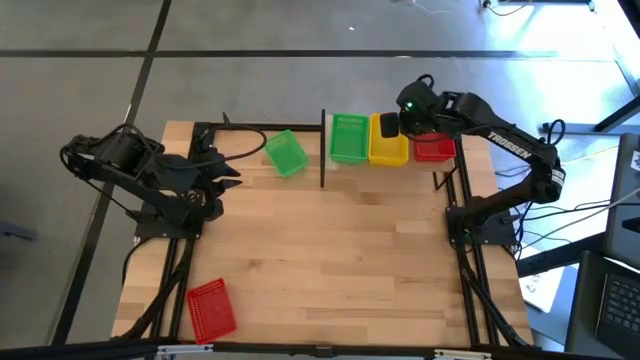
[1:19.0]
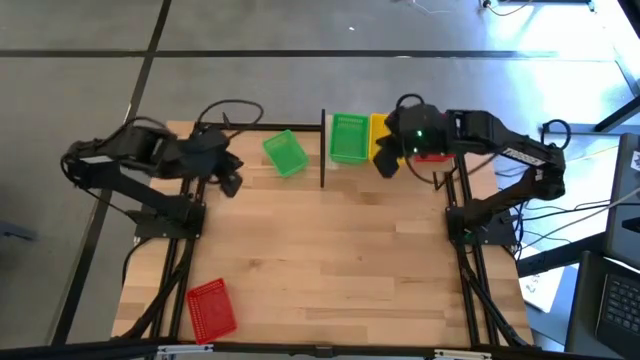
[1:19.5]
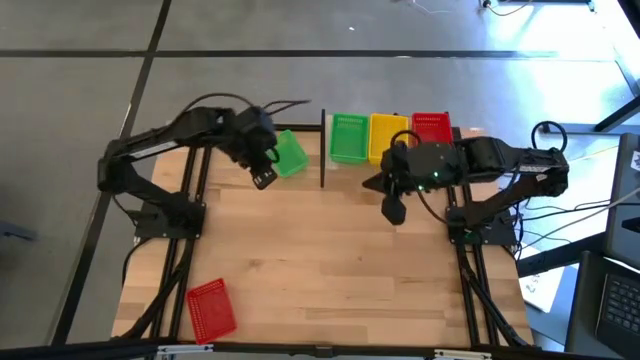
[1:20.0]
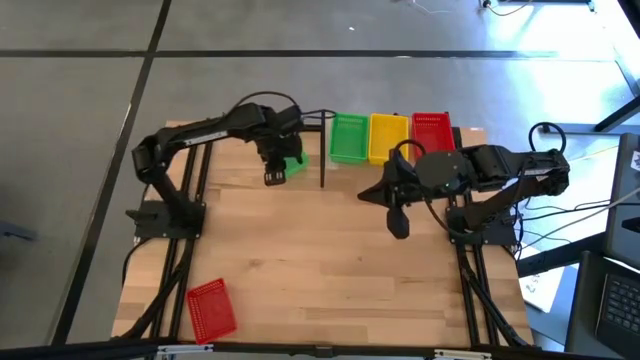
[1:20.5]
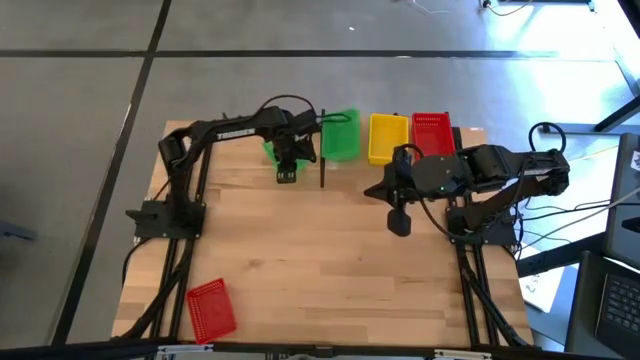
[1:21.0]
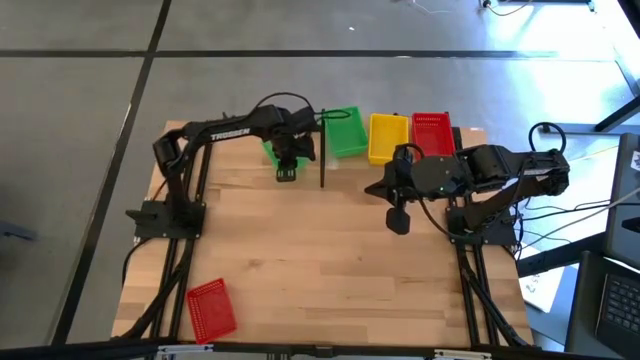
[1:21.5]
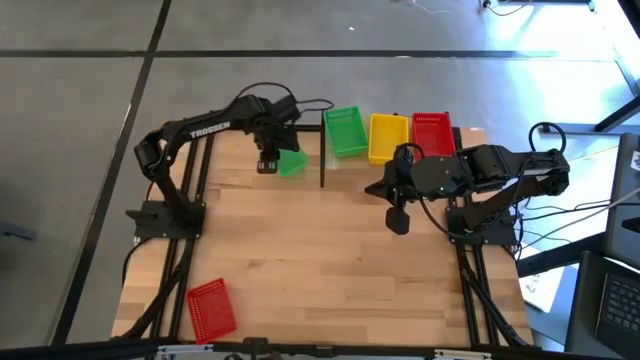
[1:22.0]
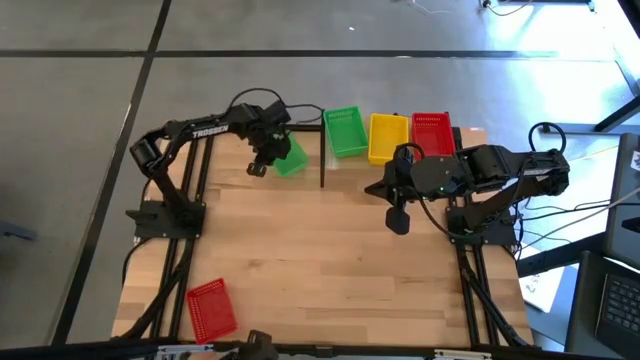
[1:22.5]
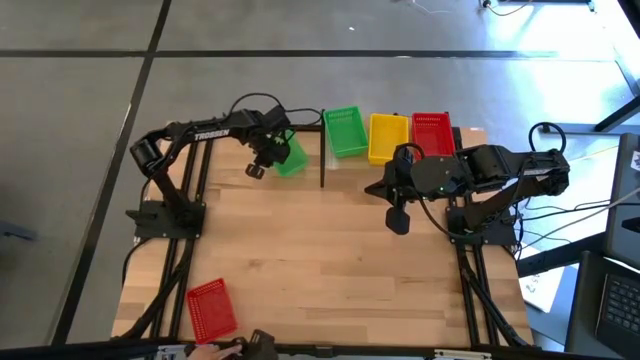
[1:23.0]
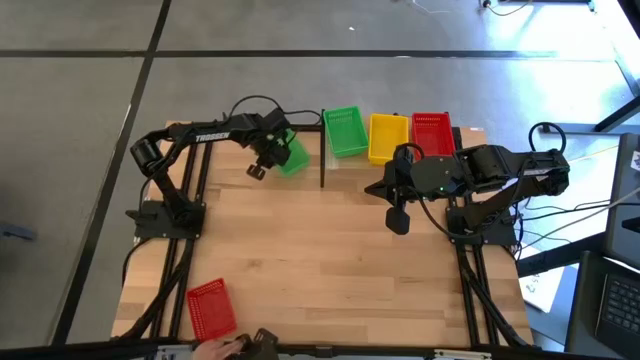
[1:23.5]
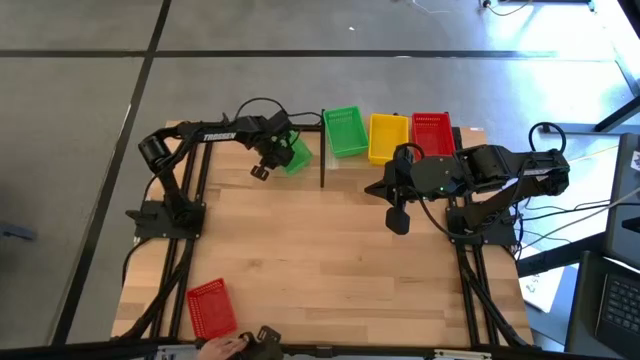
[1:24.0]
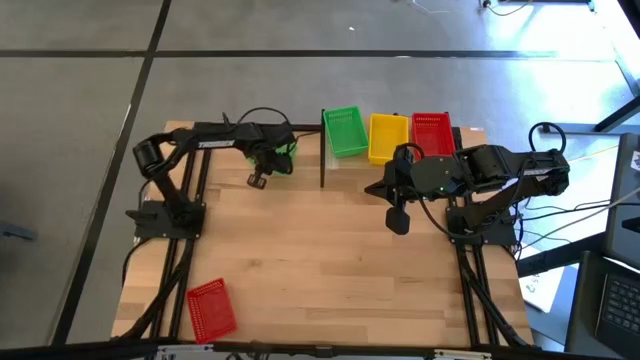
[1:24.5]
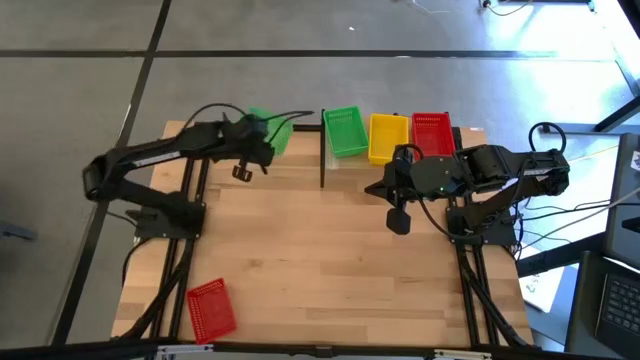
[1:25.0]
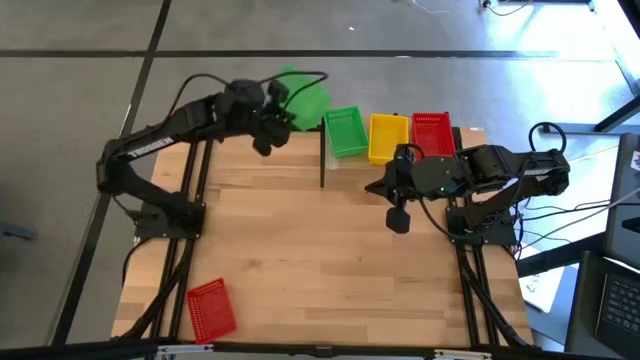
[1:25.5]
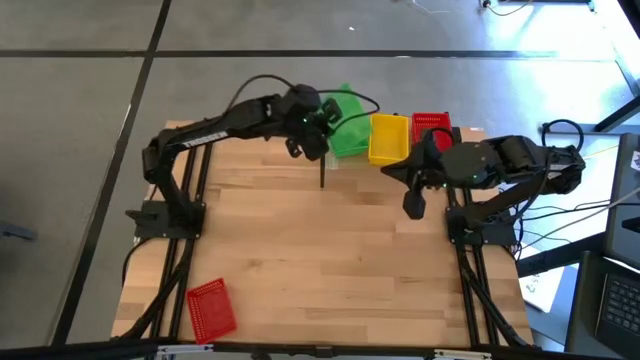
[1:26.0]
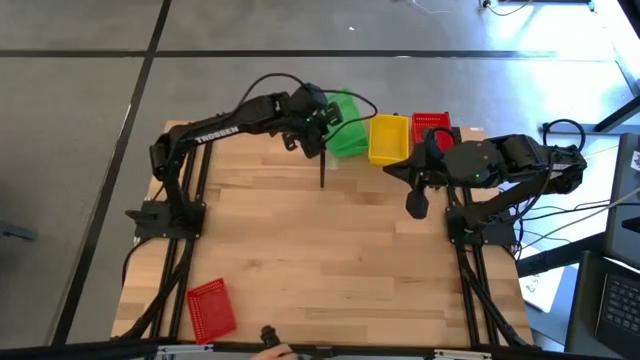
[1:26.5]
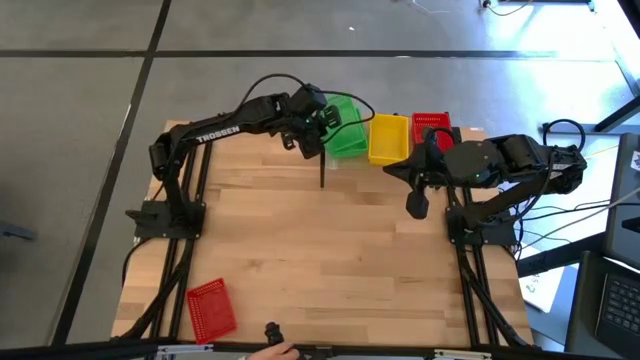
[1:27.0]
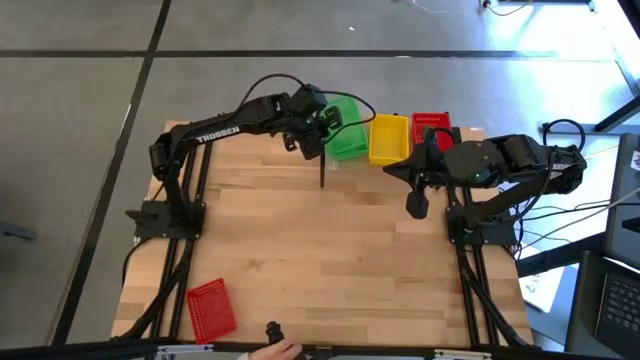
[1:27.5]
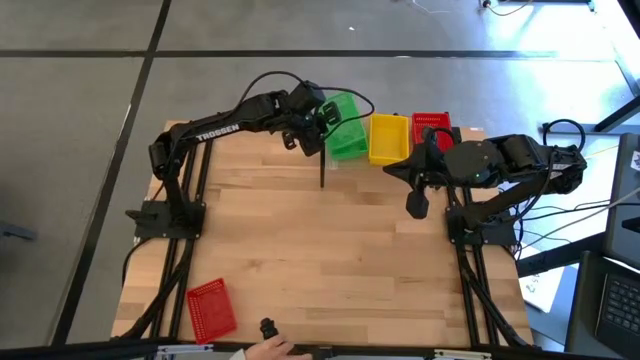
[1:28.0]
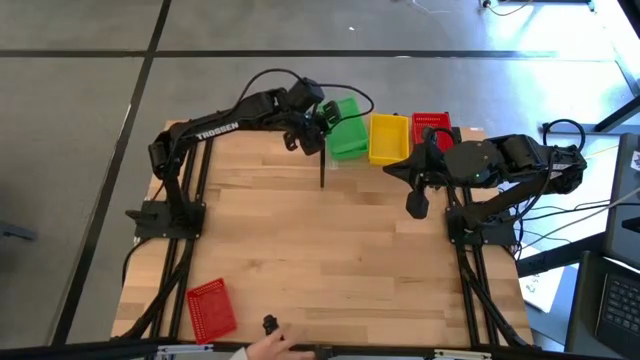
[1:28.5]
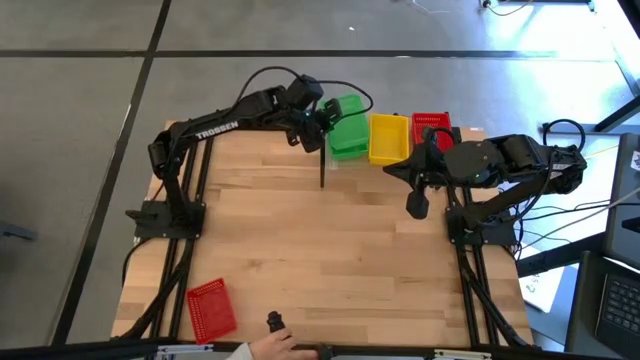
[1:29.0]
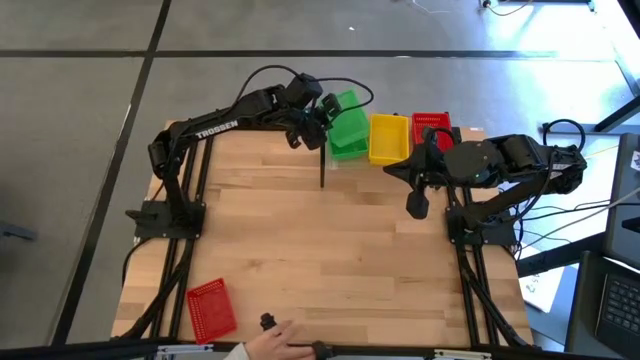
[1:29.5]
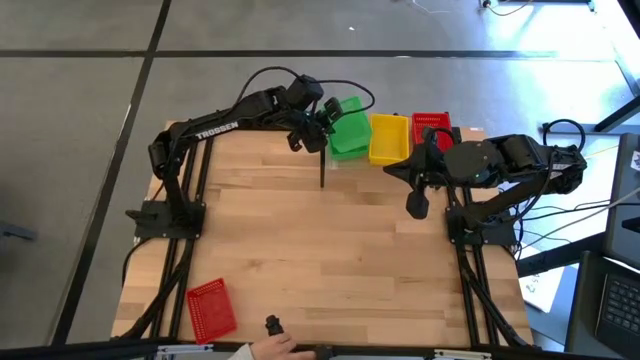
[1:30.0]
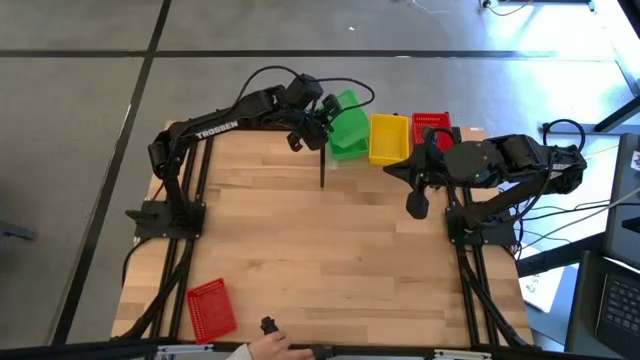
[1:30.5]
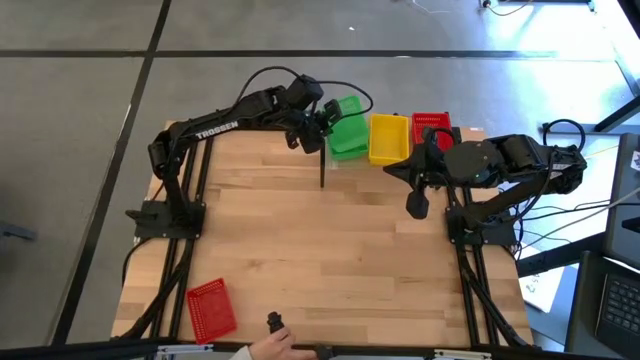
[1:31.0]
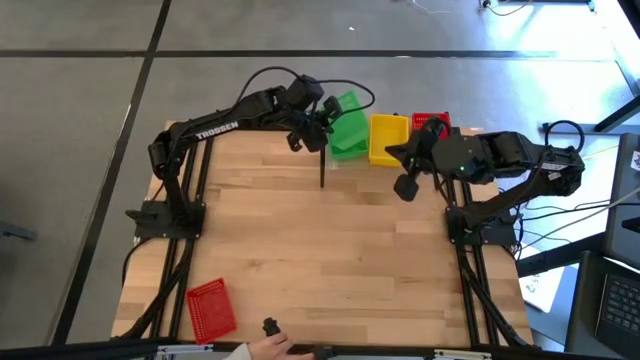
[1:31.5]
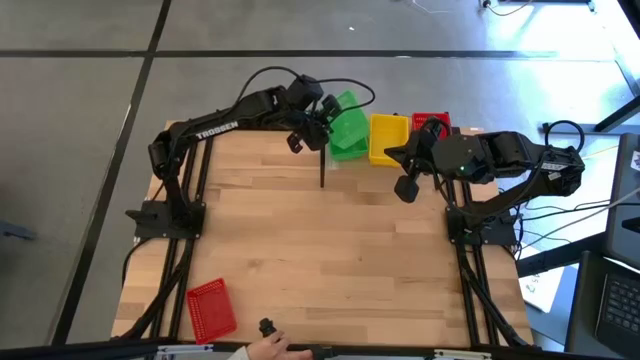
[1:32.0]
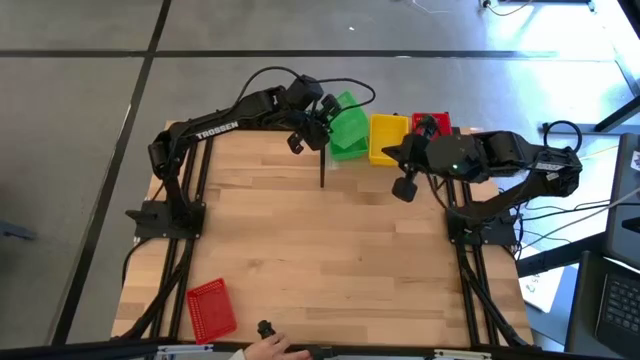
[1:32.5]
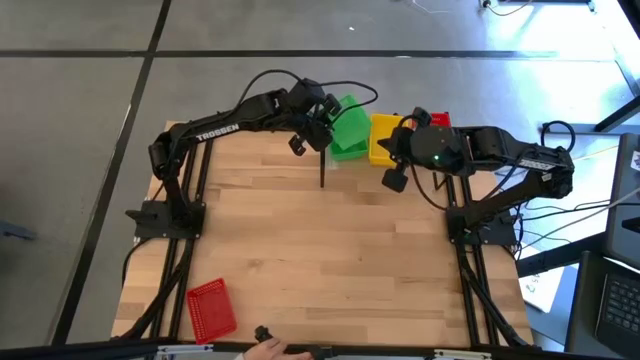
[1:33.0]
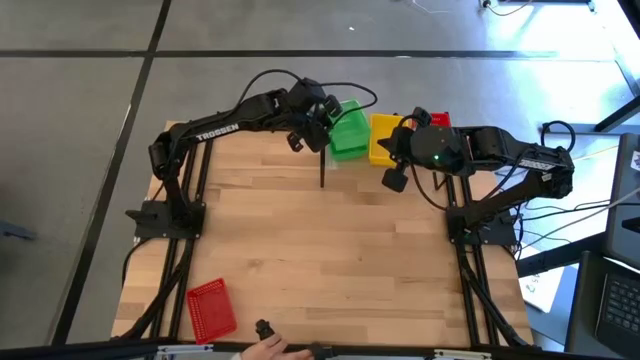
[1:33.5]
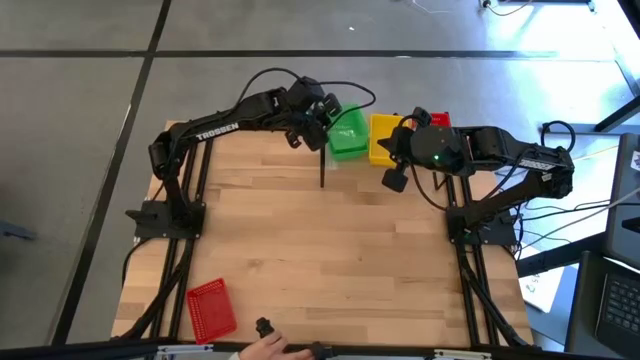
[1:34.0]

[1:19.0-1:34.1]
Task: Stack baskets on shelf by color
Stack the green bin on the green bins on the shelf

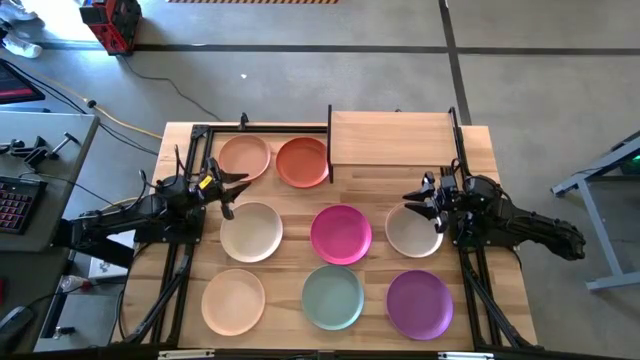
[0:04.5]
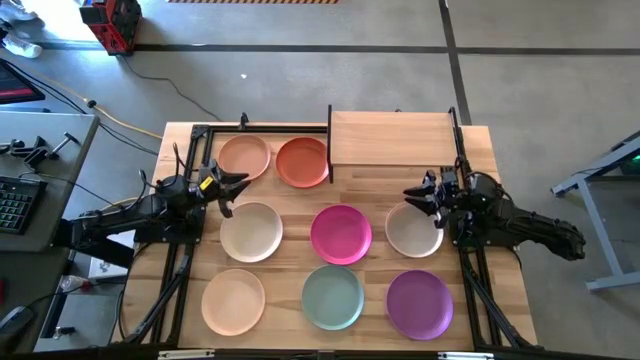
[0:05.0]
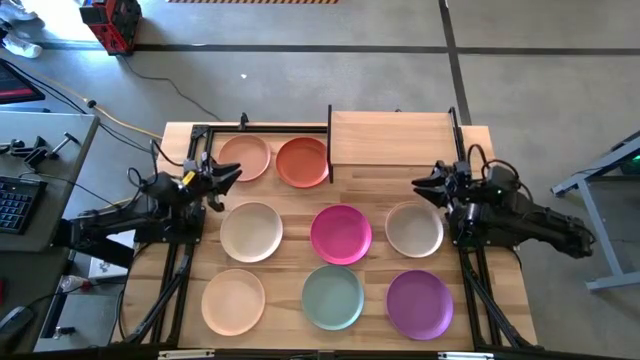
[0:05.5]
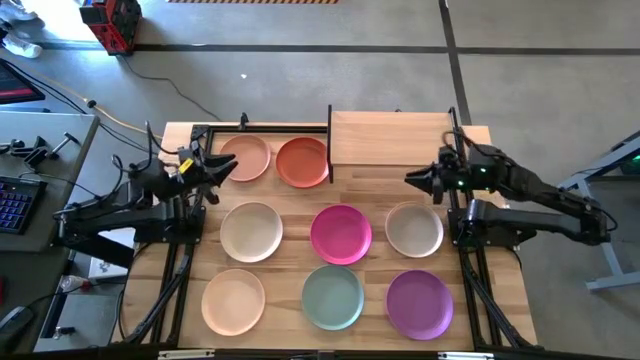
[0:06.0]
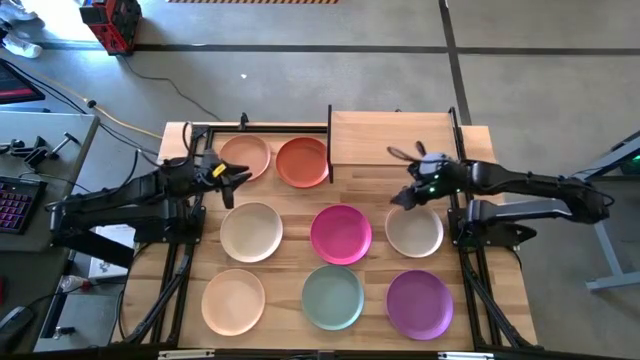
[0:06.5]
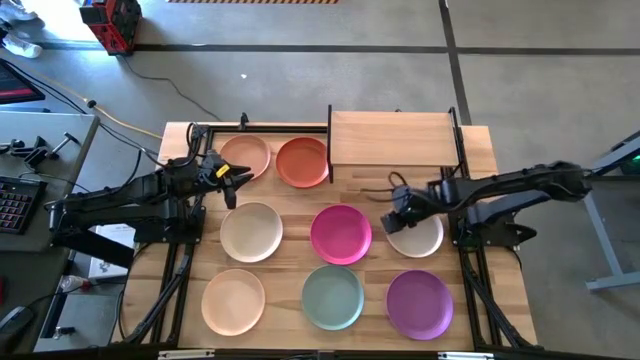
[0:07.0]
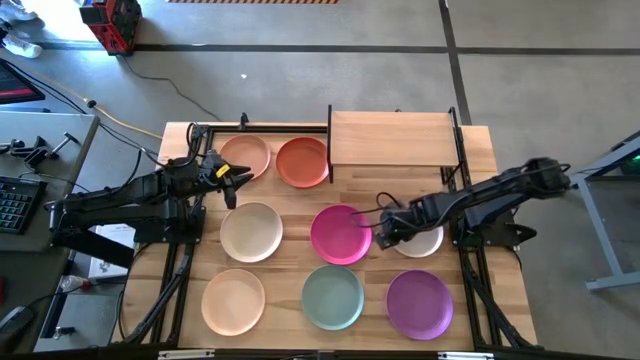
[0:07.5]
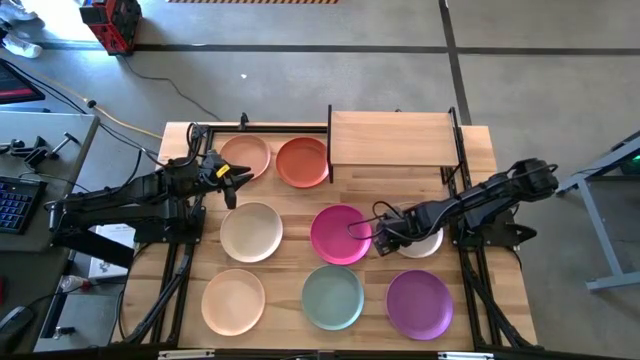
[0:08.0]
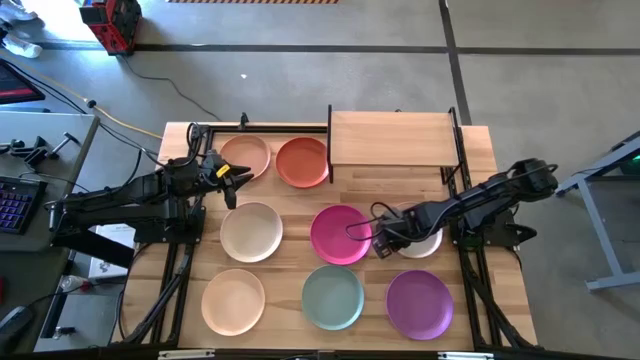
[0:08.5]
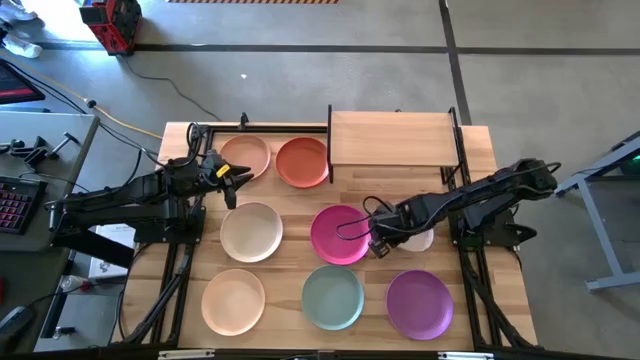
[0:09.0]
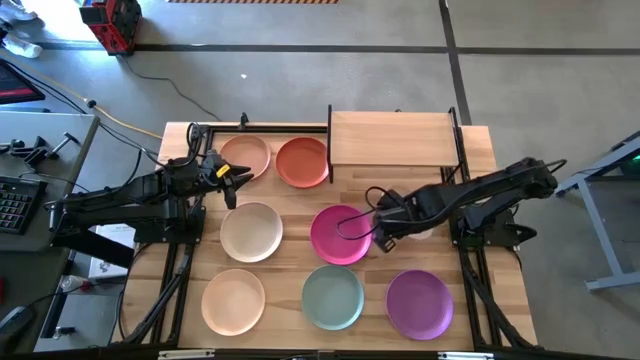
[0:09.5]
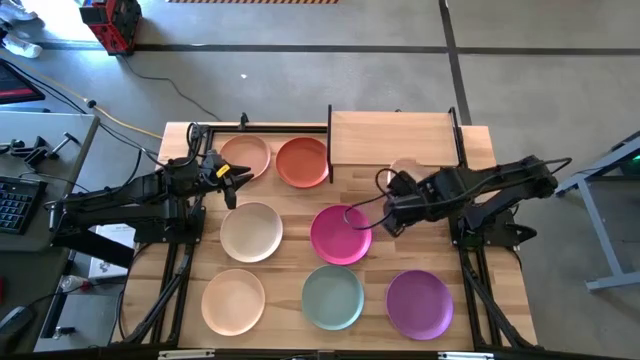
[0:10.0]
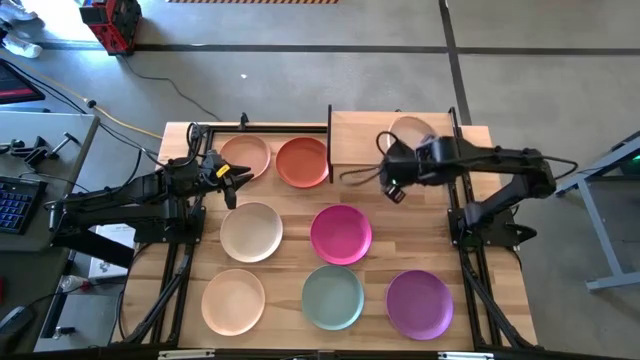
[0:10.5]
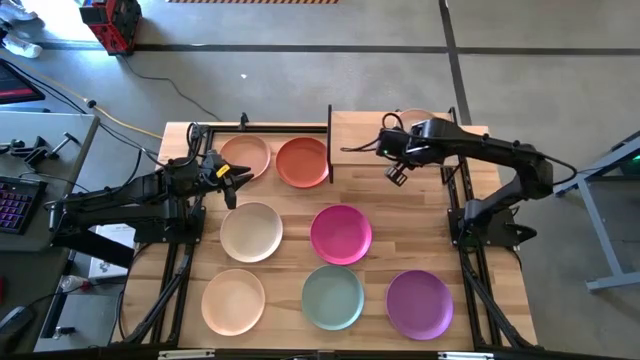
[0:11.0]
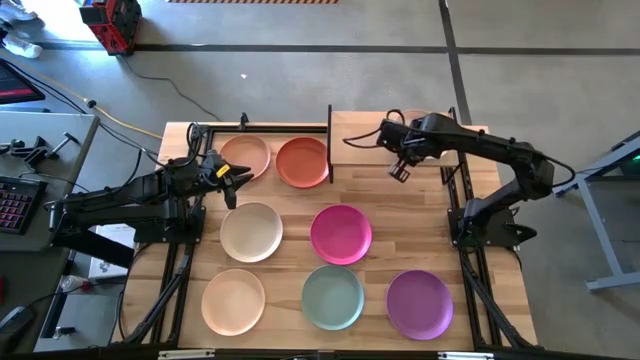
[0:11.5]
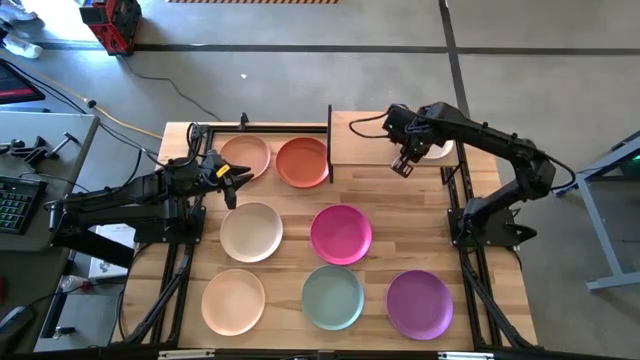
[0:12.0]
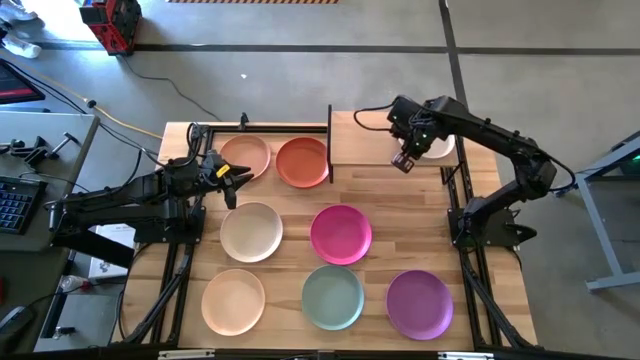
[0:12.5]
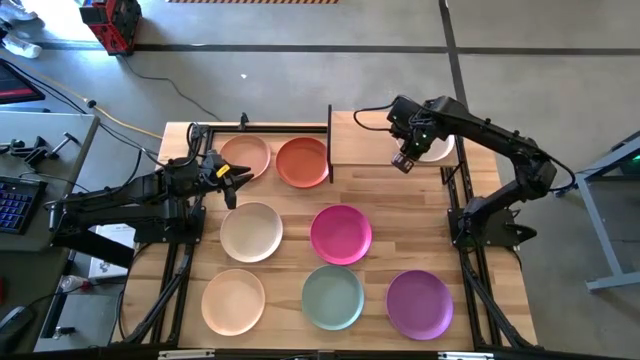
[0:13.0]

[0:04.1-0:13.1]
Task: Place and stack plates onto a shelf
Put the right white plate on the shelf
